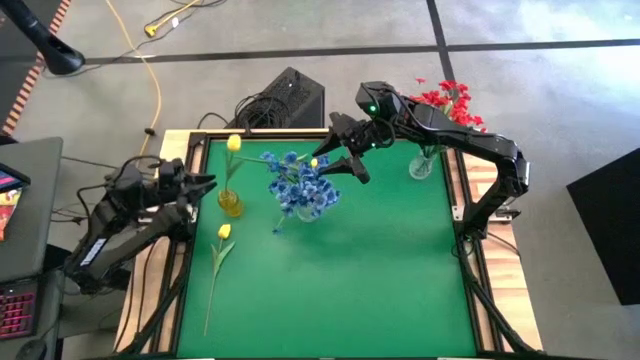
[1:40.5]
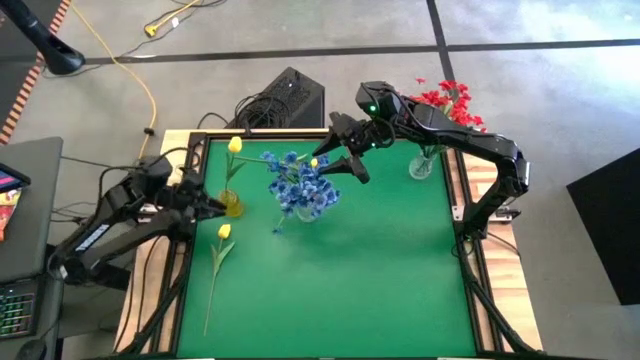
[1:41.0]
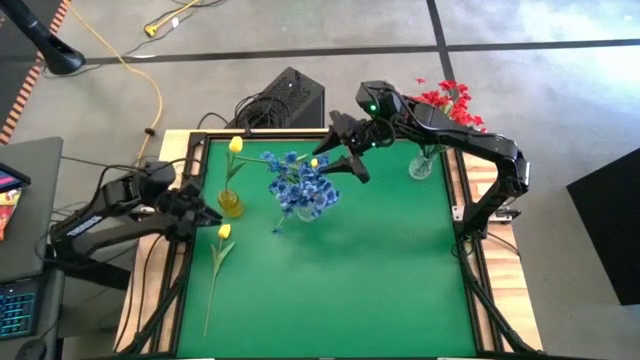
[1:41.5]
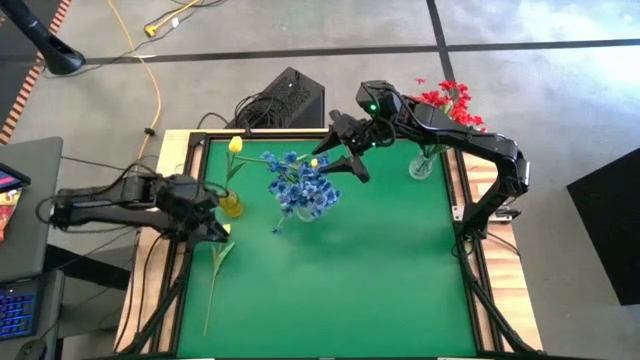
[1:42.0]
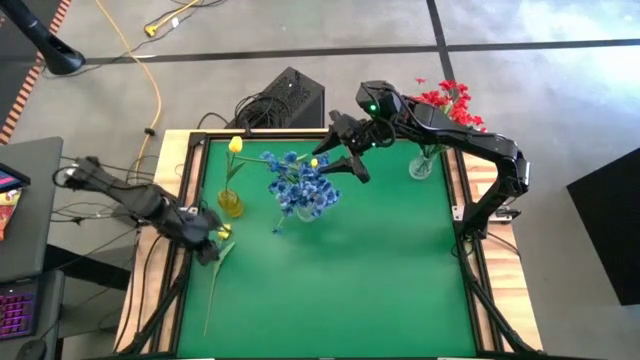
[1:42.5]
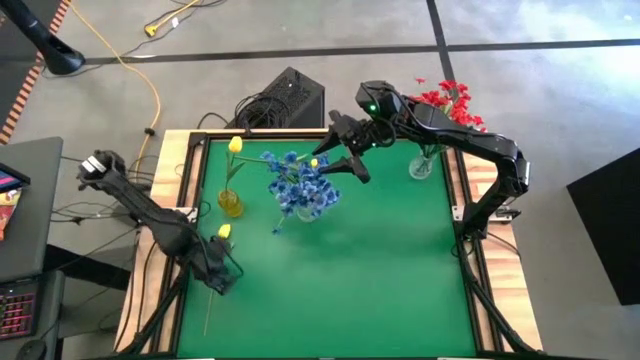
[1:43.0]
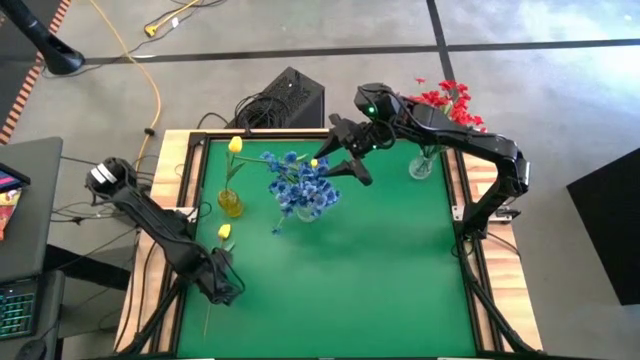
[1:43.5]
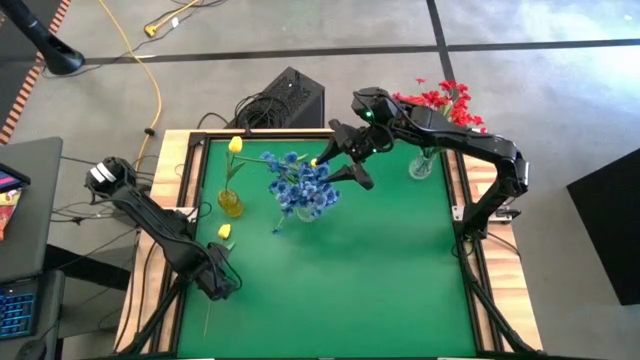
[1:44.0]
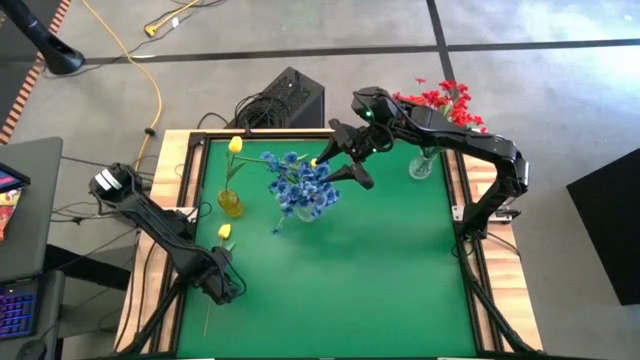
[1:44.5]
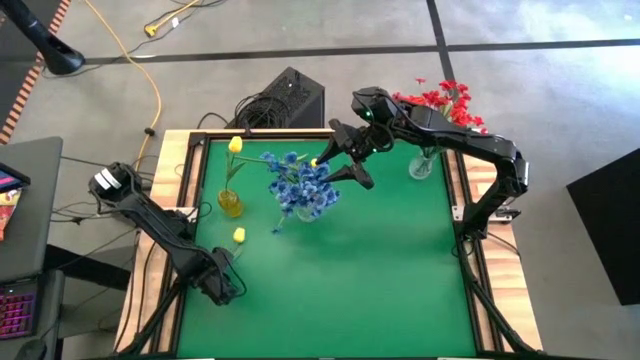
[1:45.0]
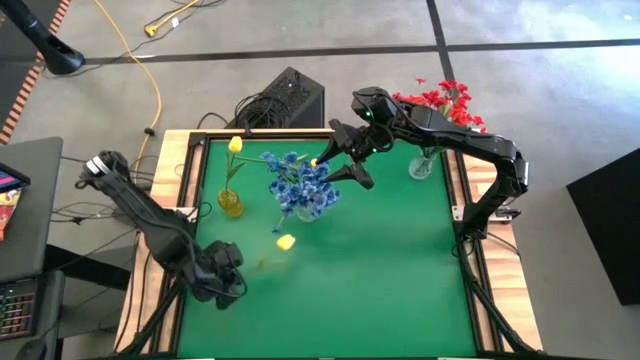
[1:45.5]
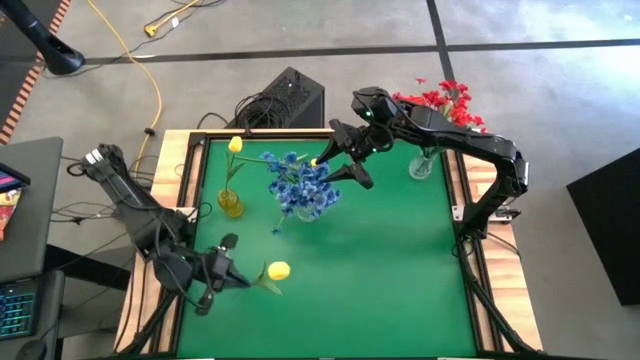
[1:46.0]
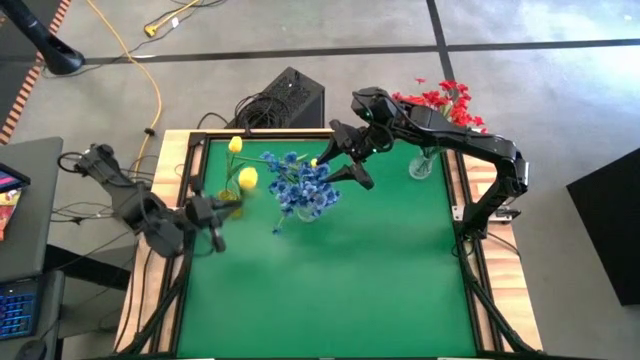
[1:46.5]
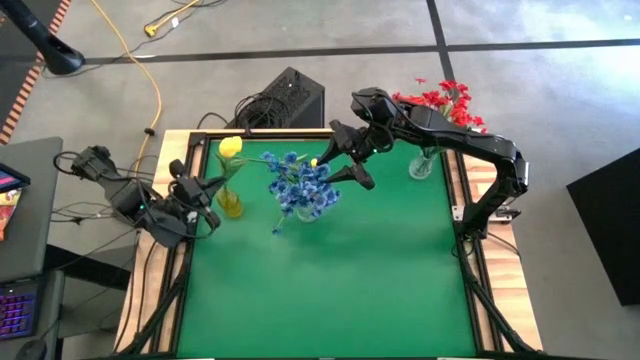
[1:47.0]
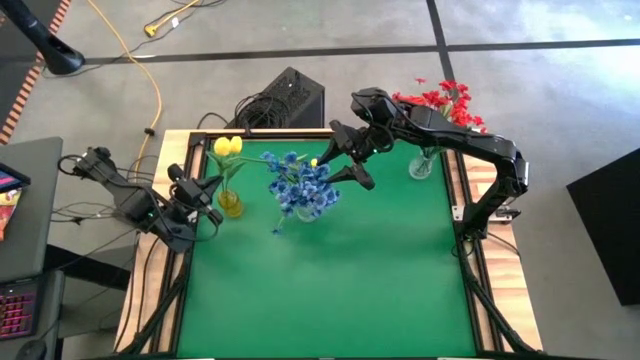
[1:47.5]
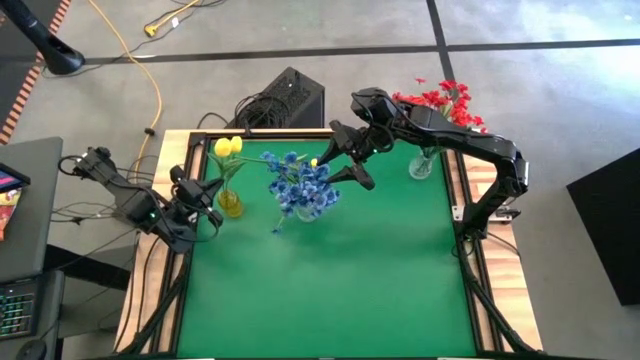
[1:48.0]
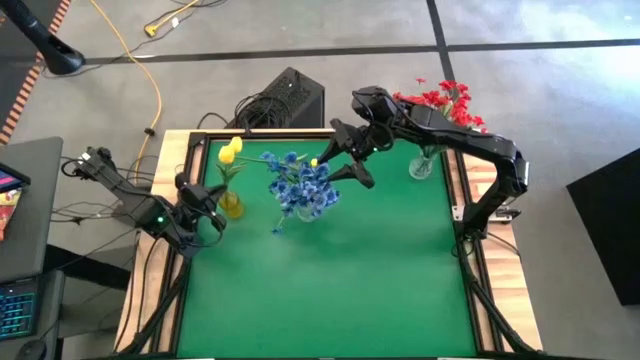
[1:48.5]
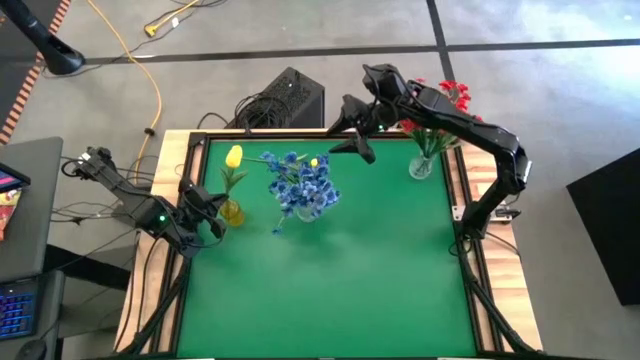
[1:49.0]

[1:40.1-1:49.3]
Task: Sort flowers into vase by color
Put the bottom yellow tulip into the yellow vase

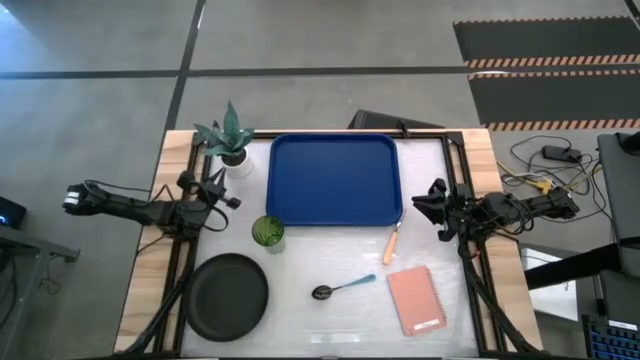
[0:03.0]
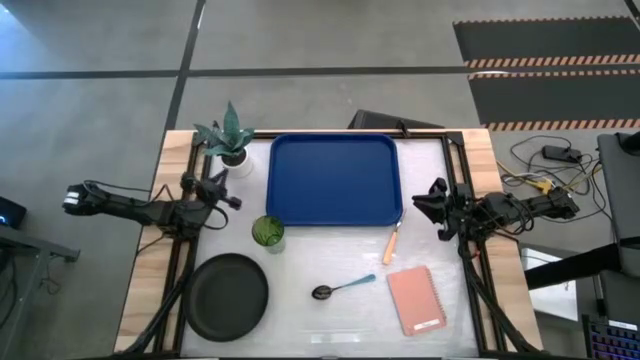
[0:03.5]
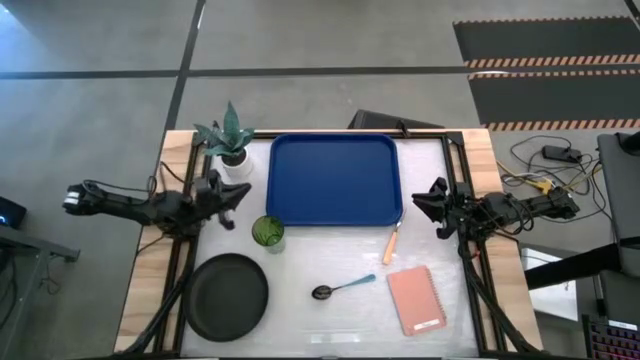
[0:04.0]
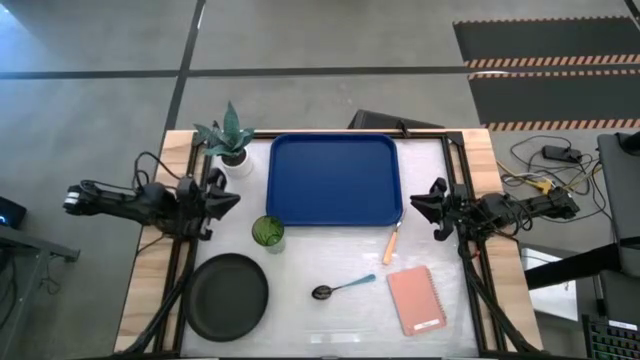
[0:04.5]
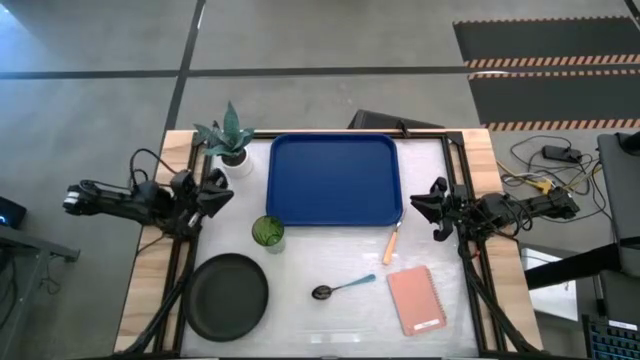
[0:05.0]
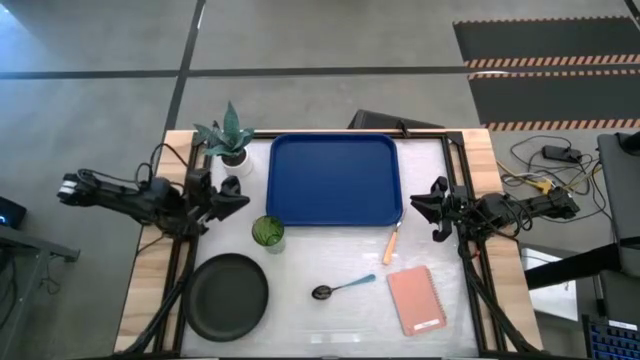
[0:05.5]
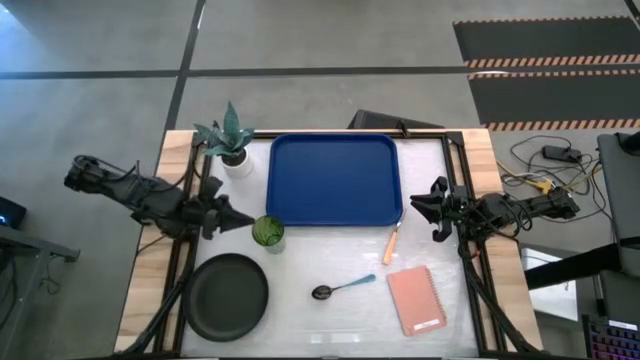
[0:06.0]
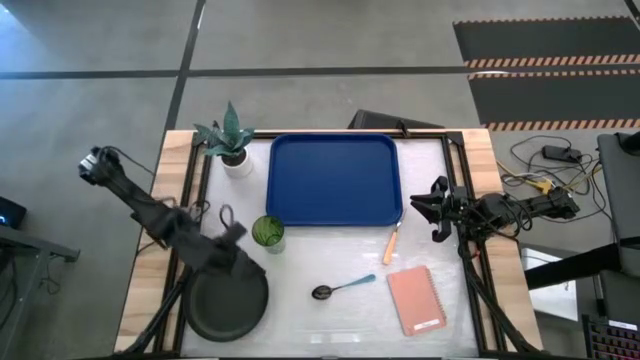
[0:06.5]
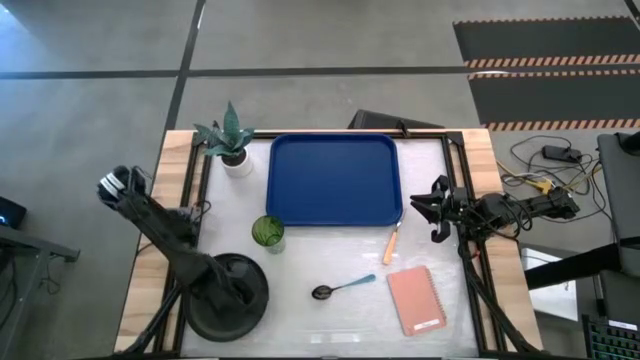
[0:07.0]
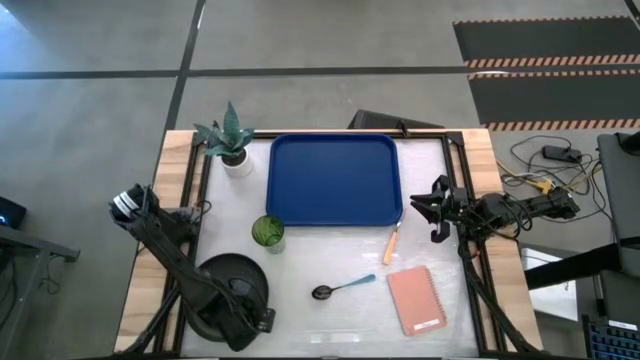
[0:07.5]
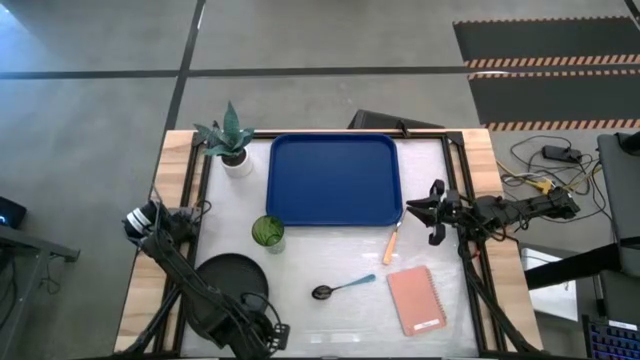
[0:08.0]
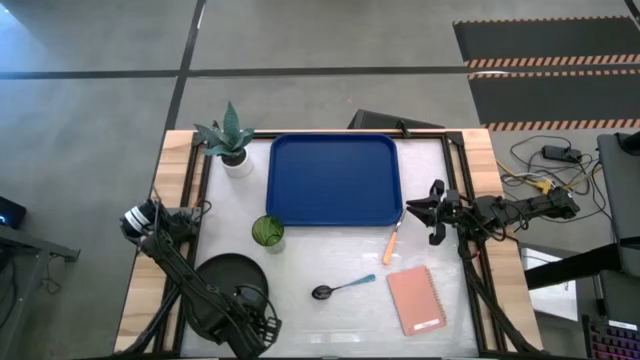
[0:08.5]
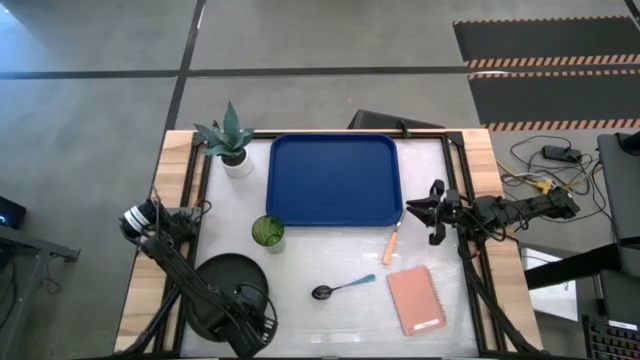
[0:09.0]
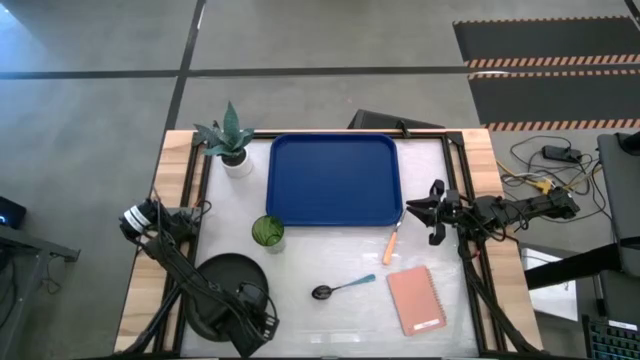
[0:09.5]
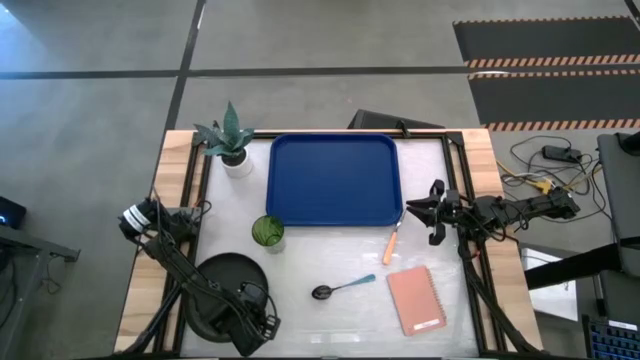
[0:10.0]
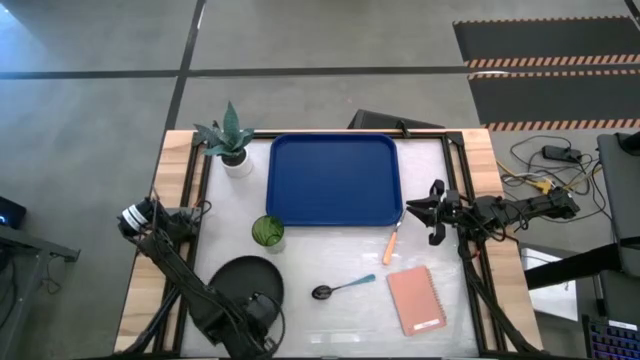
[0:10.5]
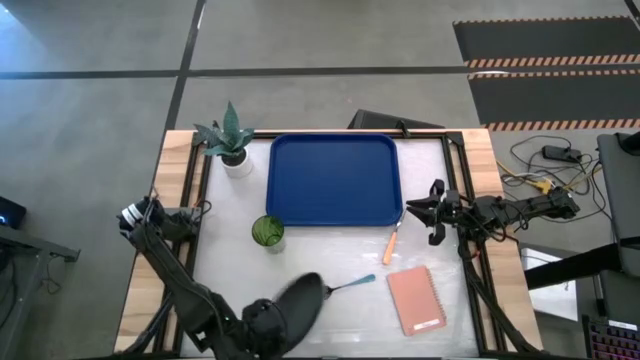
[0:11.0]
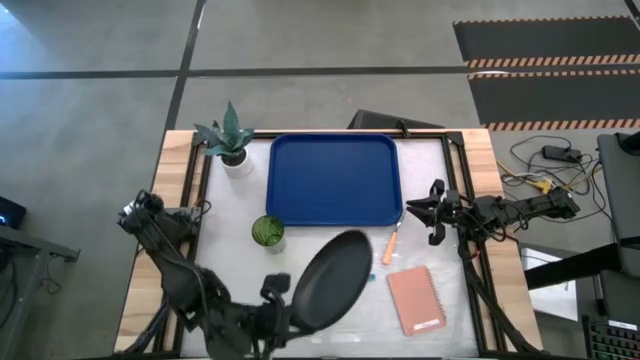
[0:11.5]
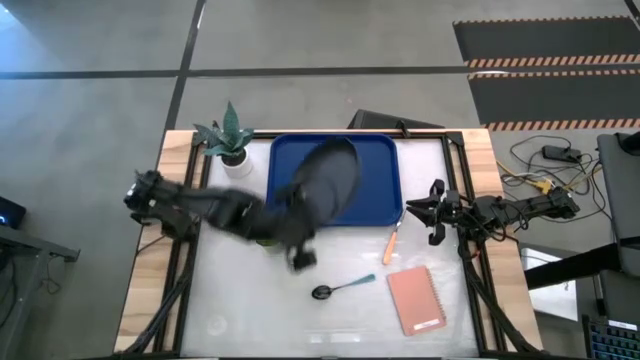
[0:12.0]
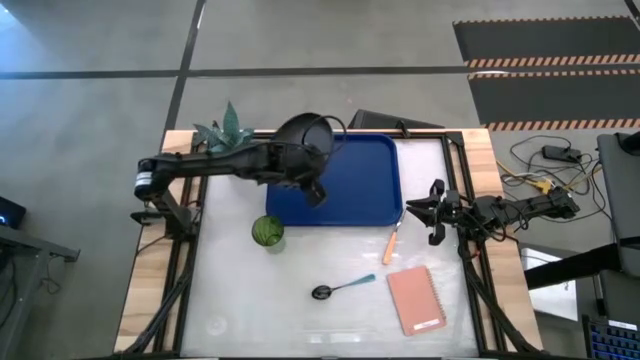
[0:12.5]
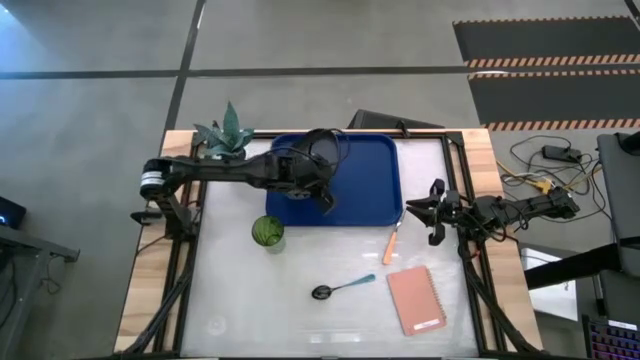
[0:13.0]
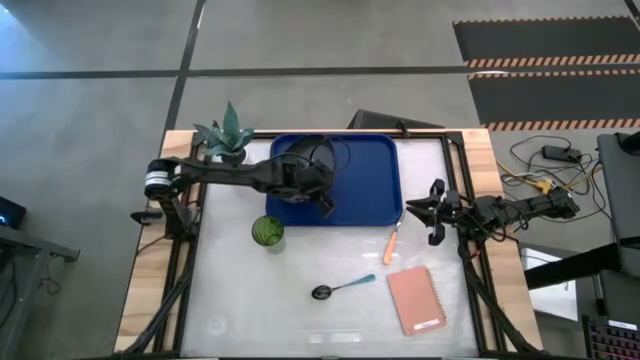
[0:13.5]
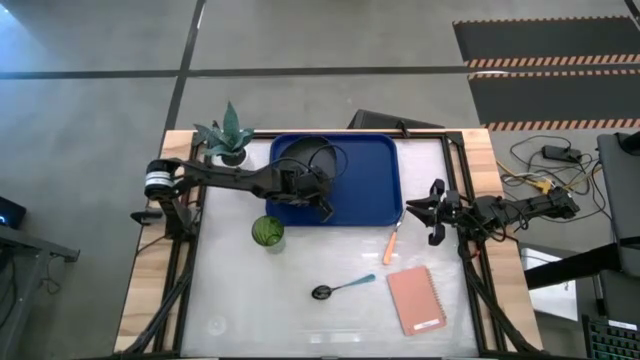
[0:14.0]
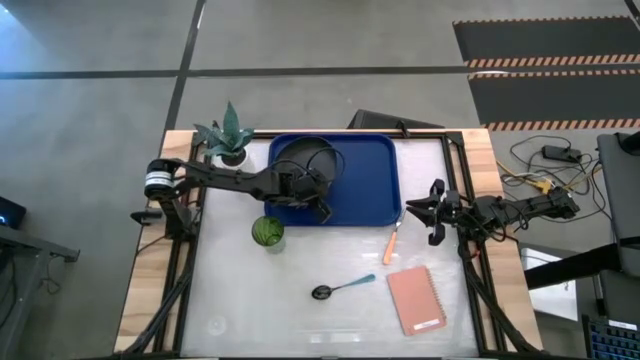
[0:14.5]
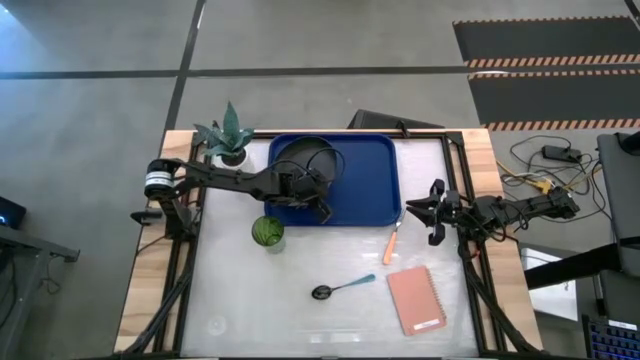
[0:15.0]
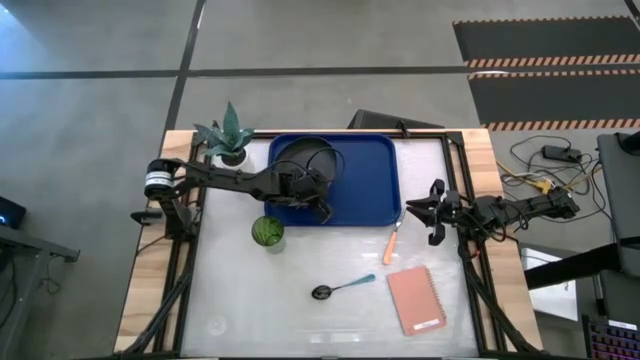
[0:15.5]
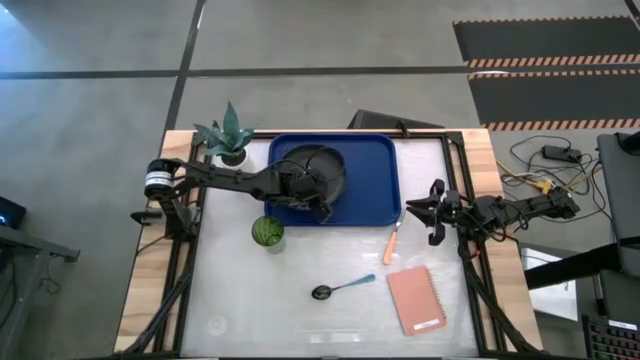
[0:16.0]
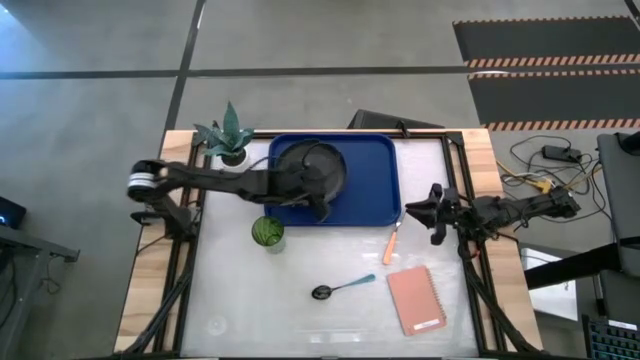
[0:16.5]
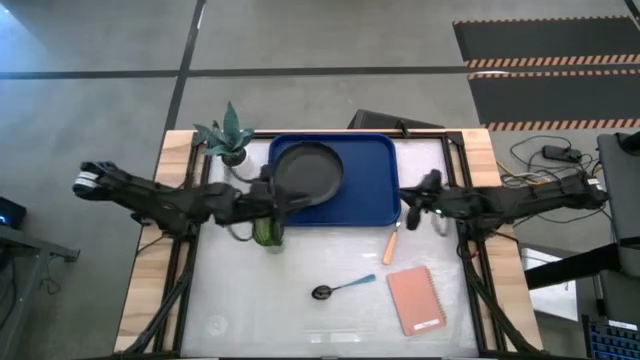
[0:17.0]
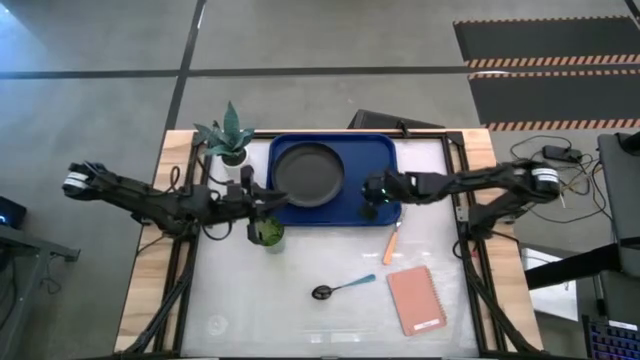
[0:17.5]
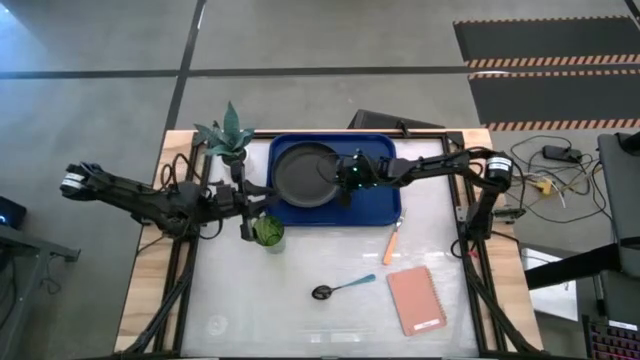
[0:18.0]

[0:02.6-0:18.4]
Task: Pick and place plate/cup/fork/spoon on tray
Put the black plate on the blue tray
